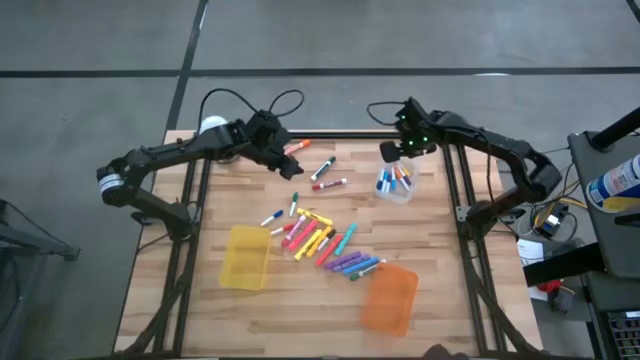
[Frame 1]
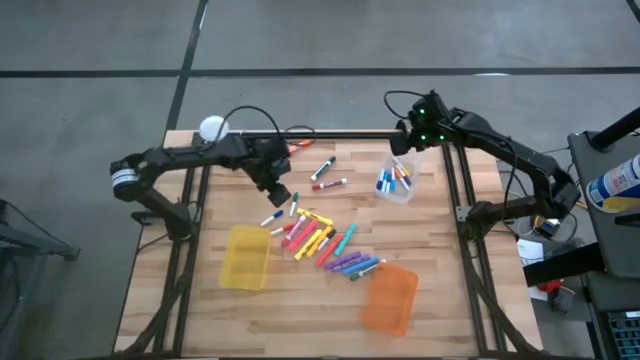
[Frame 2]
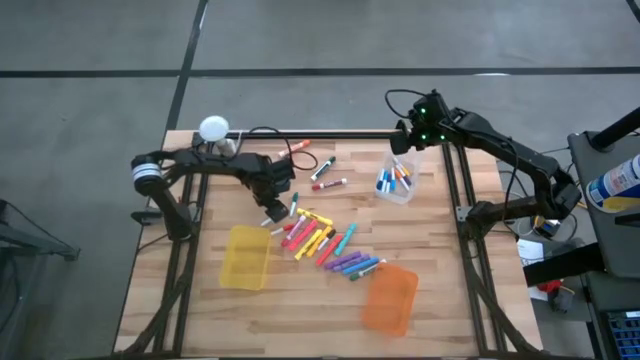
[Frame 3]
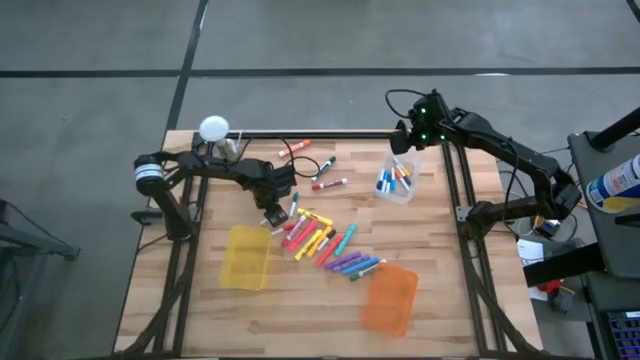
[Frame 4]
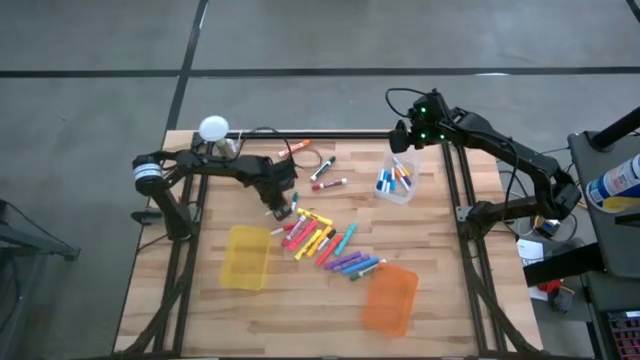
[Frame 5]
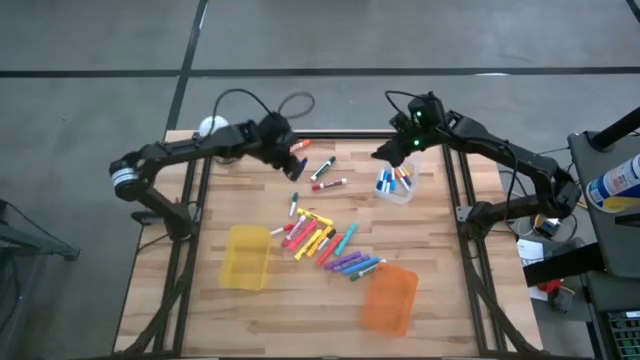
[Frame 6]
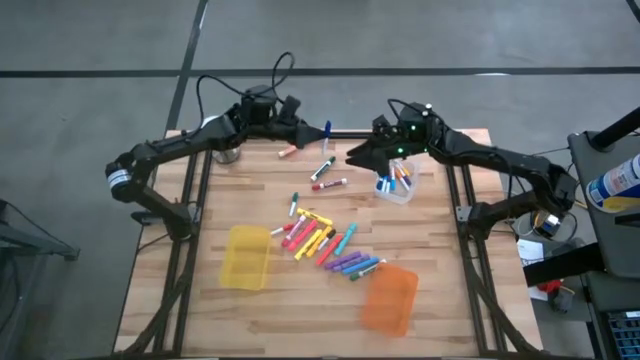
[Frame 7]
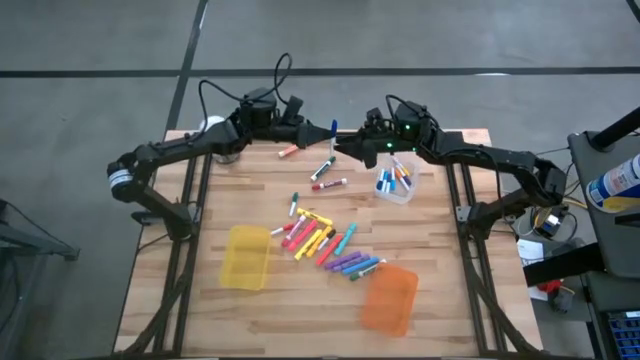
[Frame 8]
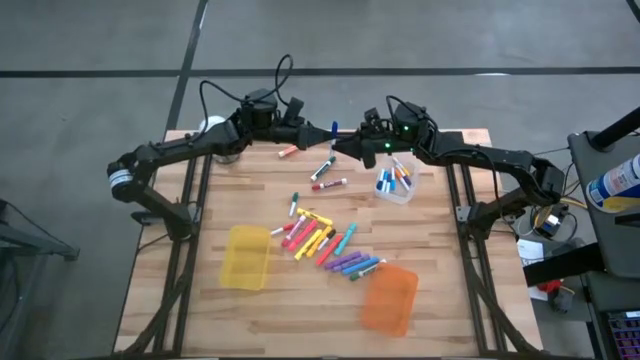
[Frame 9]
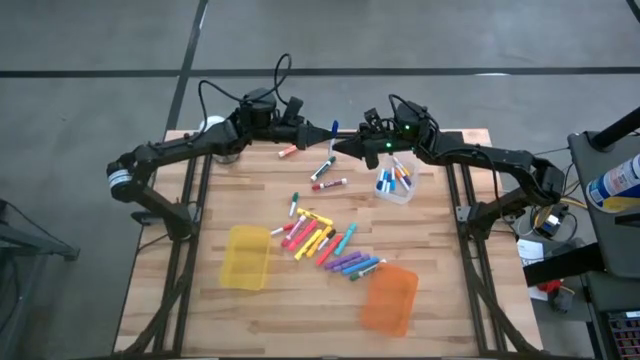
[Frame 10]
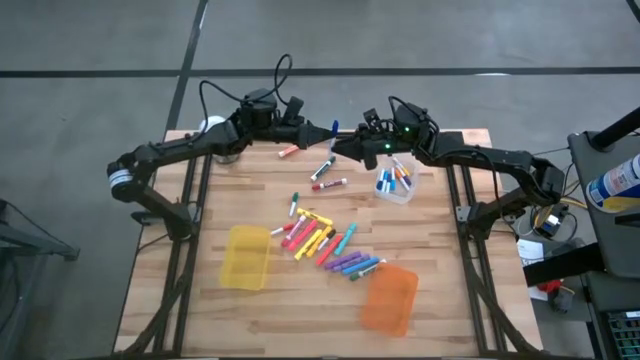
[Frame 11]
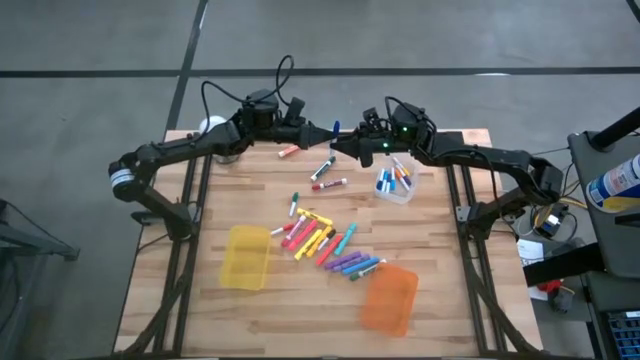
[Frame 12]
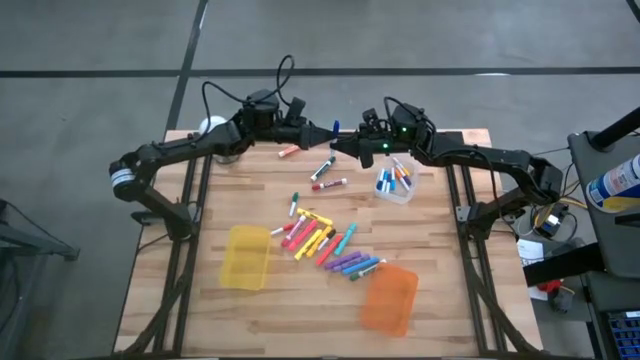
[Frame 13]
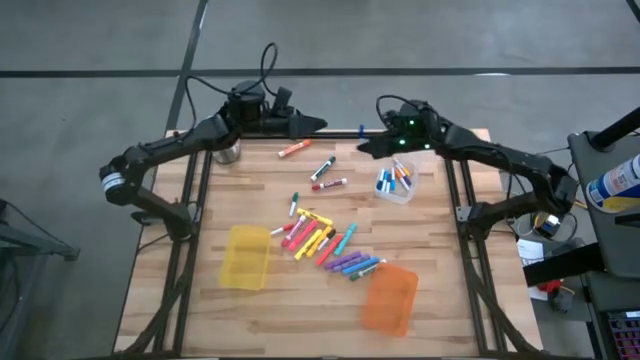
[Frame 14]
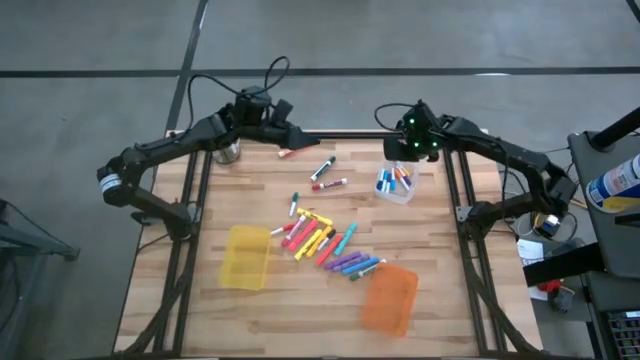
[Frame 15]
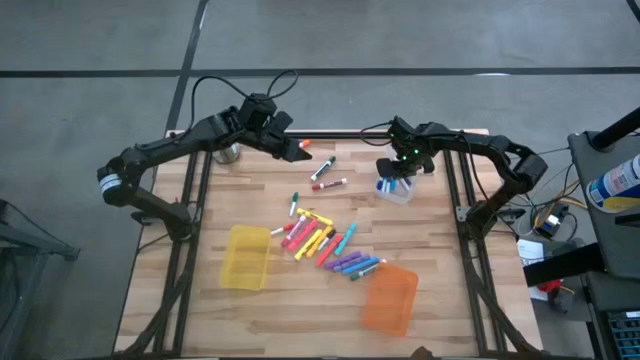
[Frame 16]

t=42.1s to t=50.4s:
Task: Pick & Place Markers
Put the small dark blue highlighter pen into the transparent bin

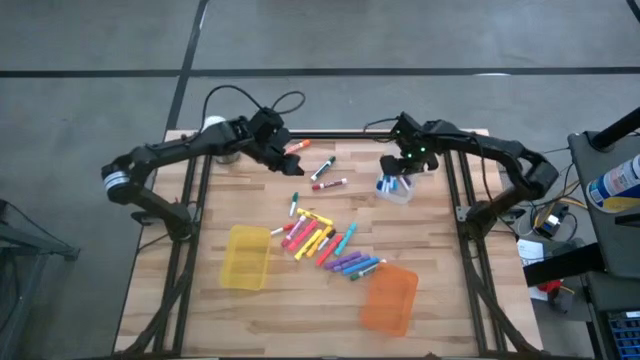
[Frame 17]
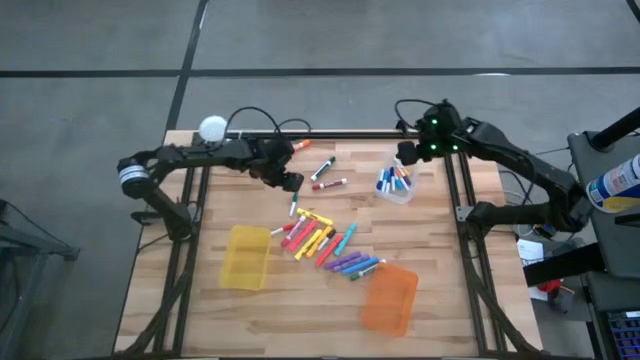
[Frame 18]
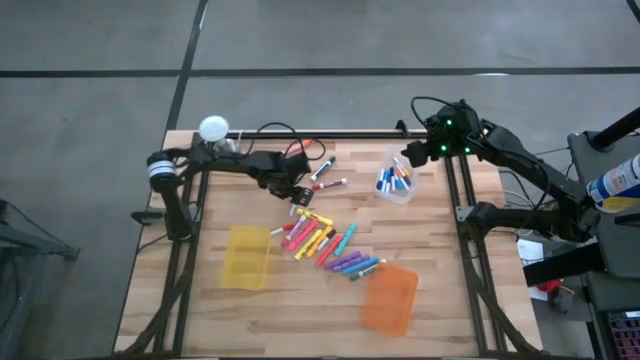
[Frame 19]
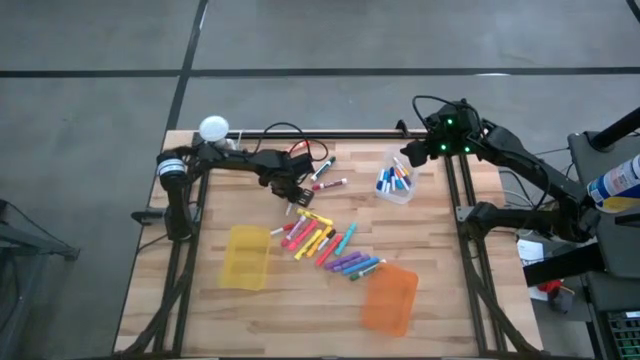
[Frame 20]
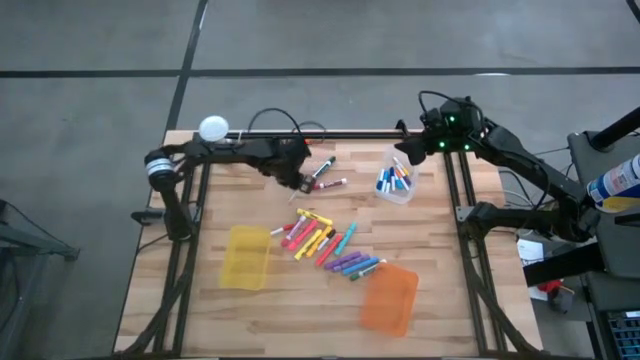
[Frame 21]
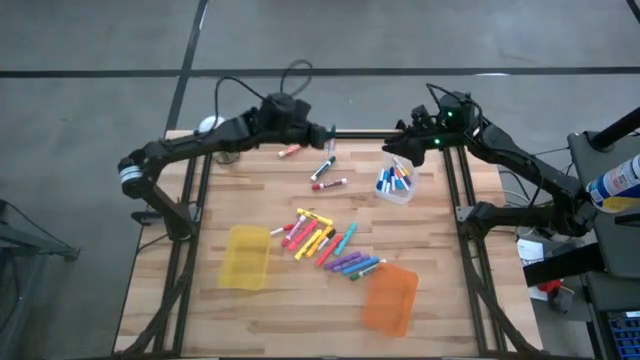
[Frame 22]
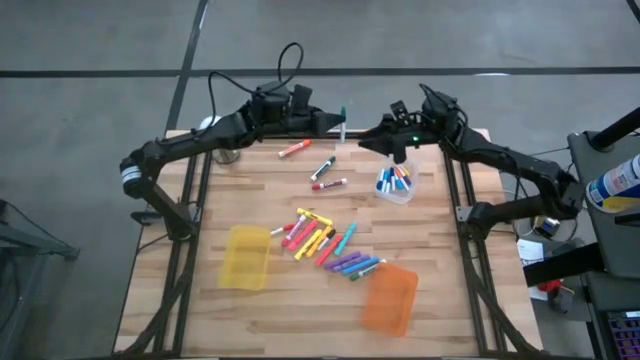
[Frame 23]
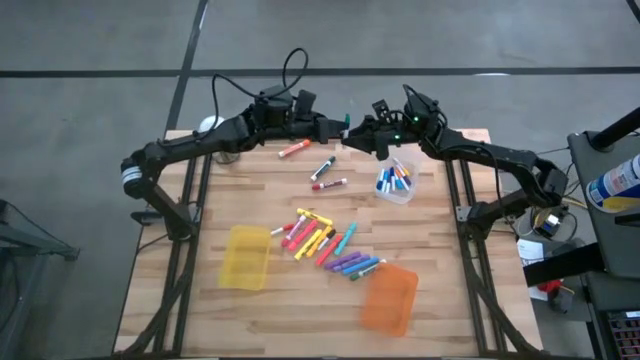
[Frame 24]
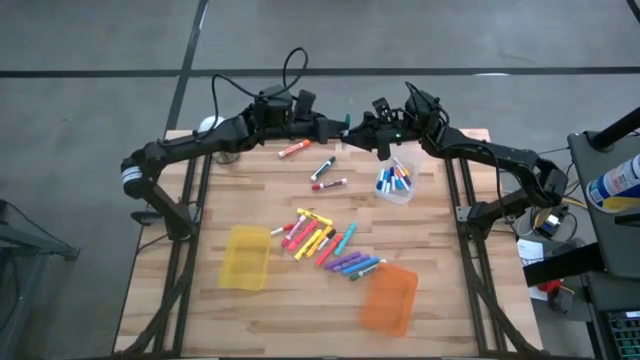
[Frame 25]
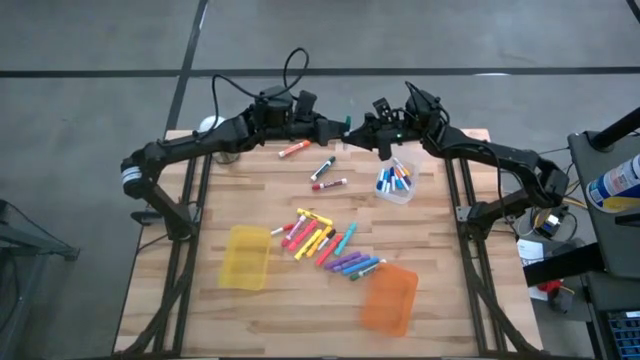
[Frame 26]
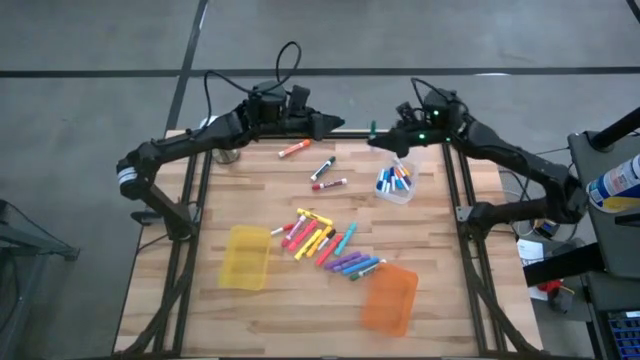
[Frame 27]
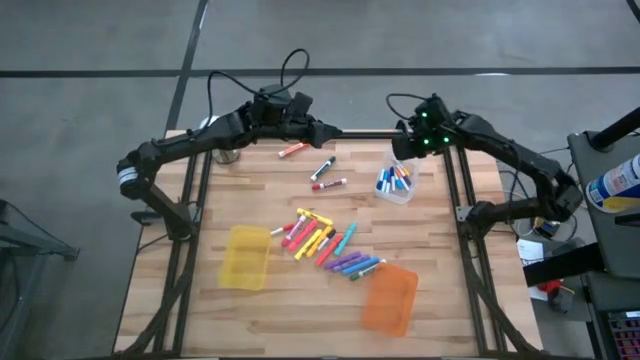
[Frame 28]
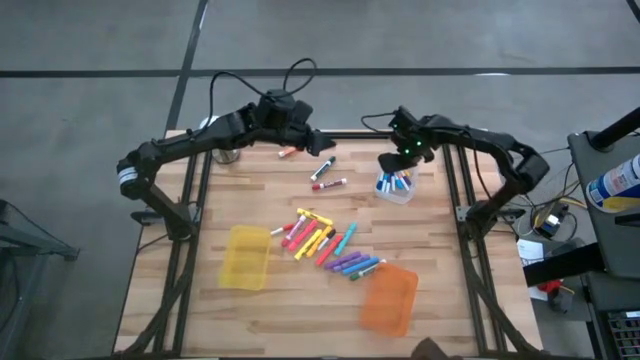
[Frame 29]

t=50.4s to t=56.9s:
Put the small green highlighter pen into the transparent bin

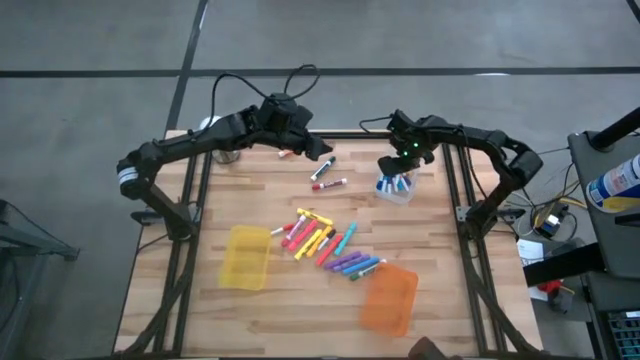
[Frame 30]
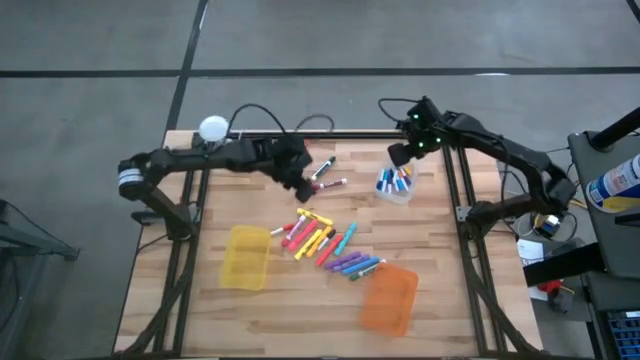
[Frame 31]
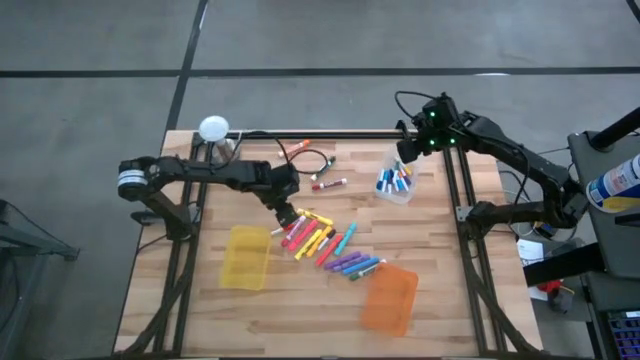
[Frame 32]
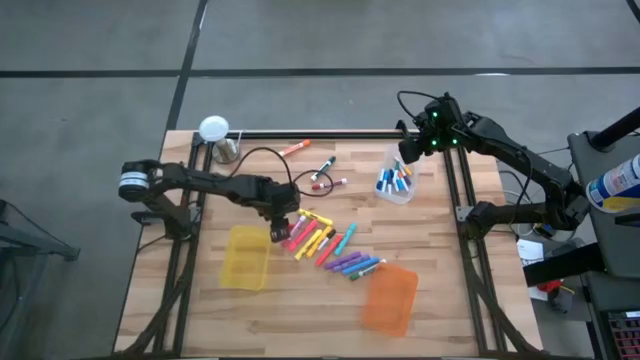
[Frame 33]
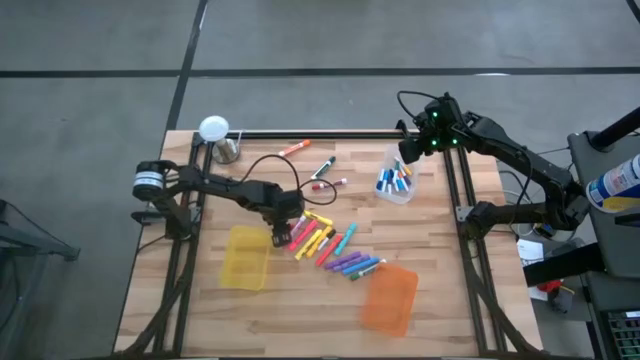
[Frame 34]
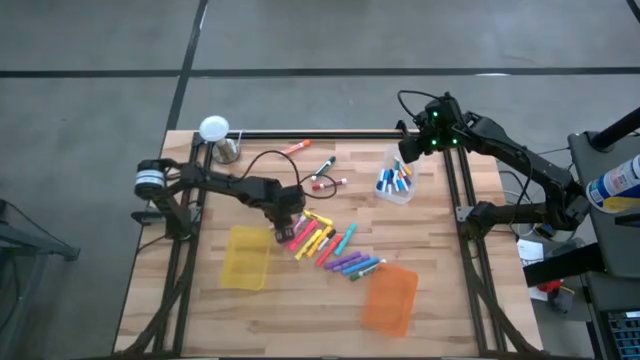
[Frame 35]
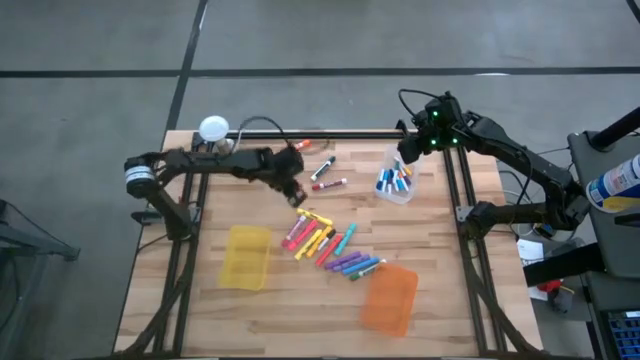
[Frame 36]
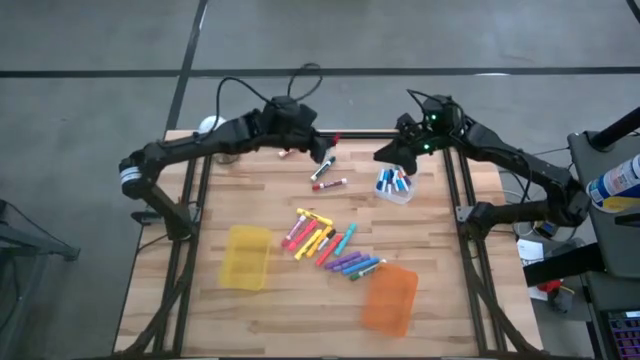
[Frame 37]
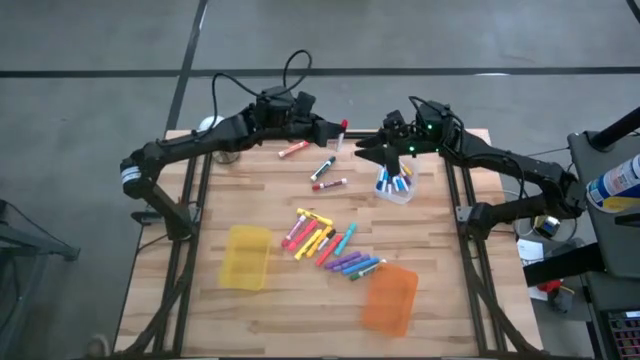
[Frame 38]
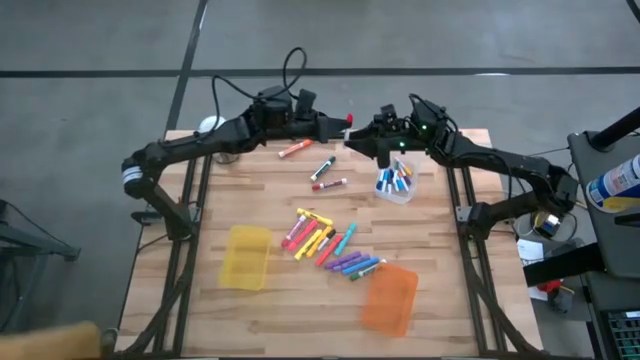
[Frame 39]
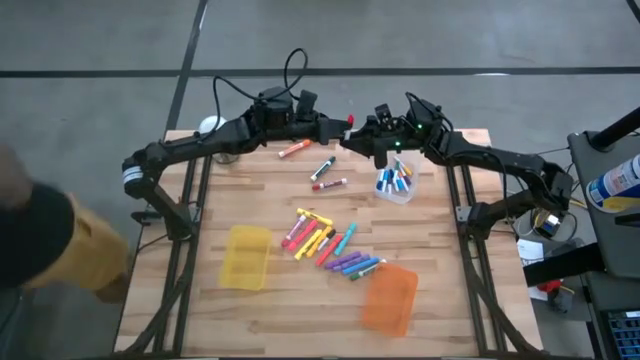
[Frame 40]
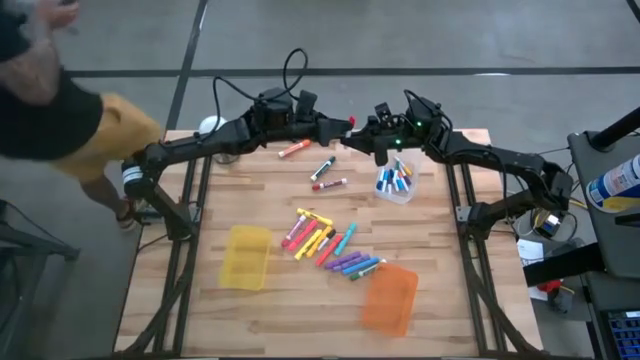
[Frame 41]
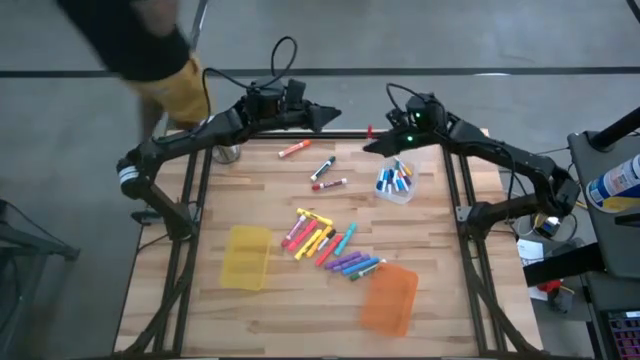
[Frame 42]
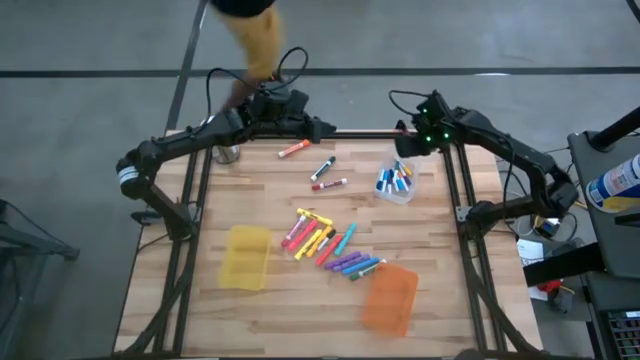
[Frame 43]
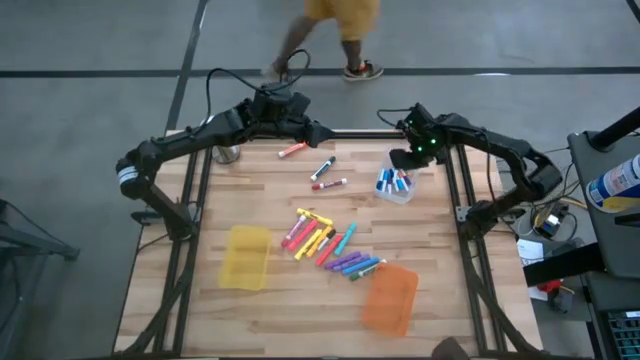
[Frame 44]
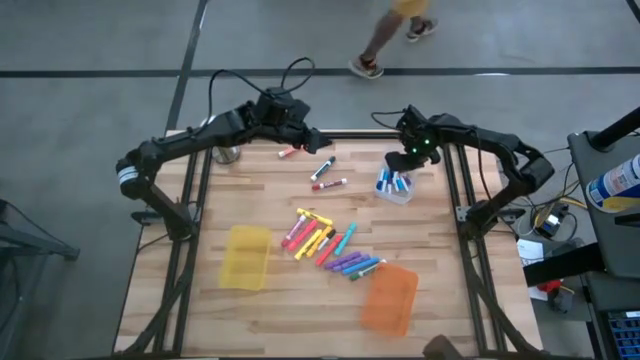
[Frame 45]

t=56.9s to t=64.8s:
Put the small red highlighter pen into the transparent bin
